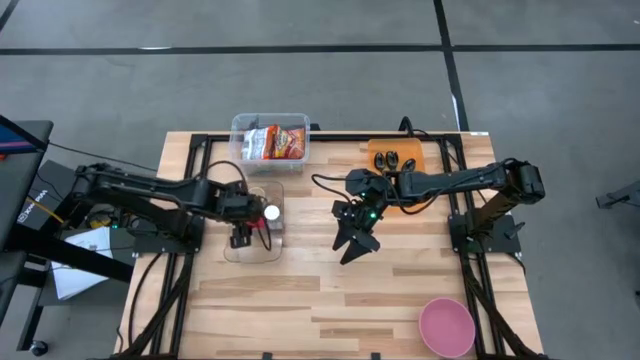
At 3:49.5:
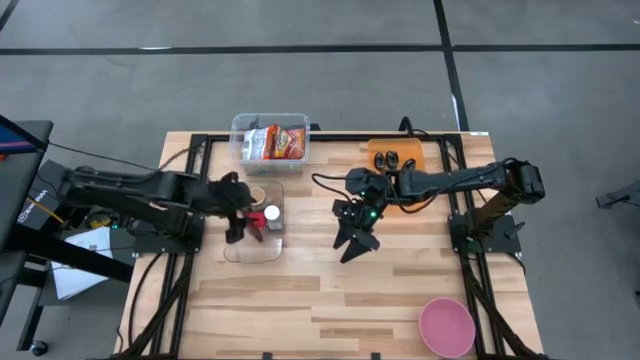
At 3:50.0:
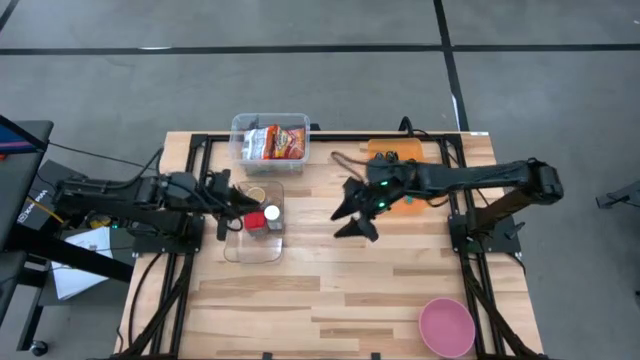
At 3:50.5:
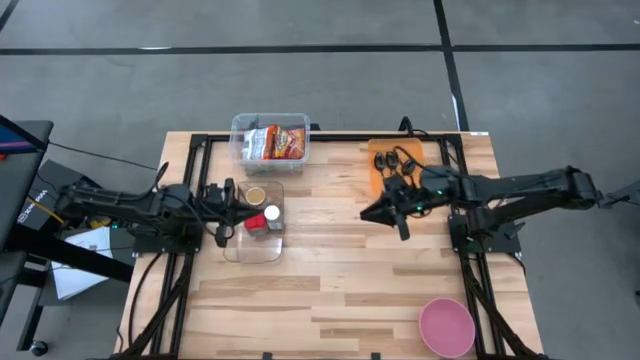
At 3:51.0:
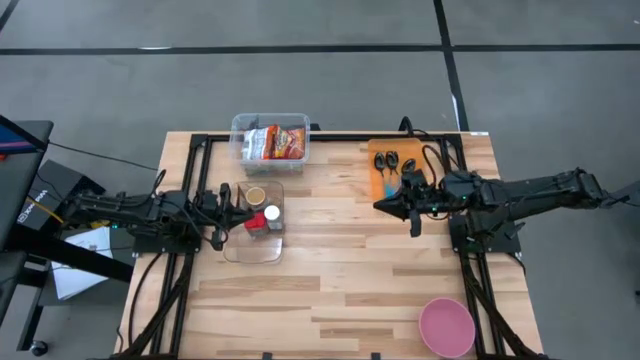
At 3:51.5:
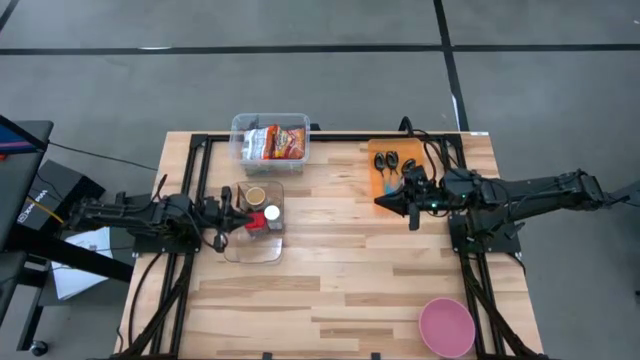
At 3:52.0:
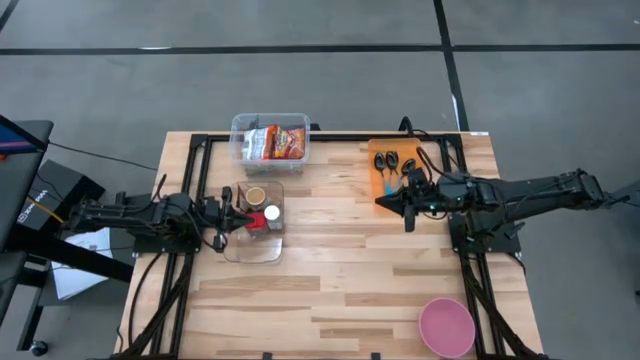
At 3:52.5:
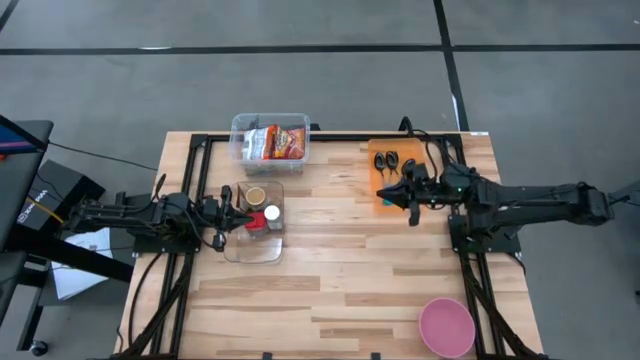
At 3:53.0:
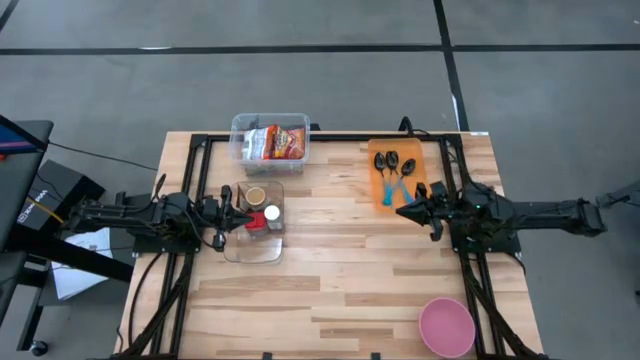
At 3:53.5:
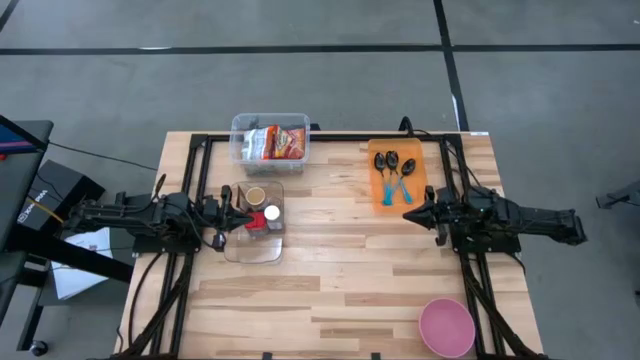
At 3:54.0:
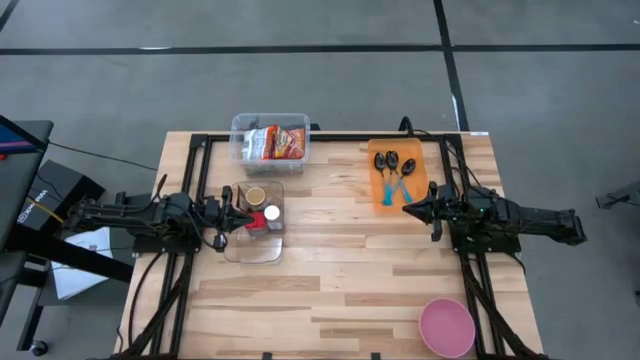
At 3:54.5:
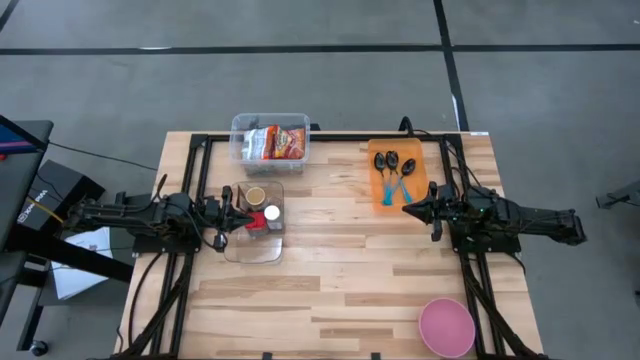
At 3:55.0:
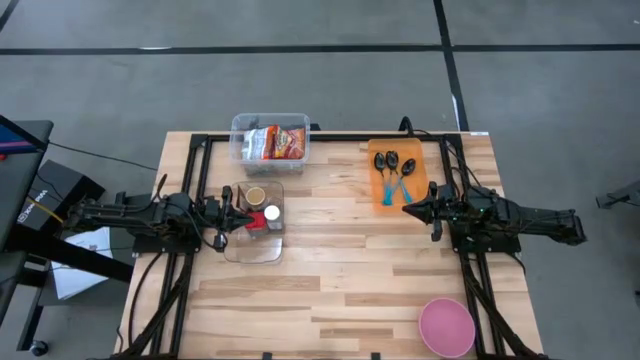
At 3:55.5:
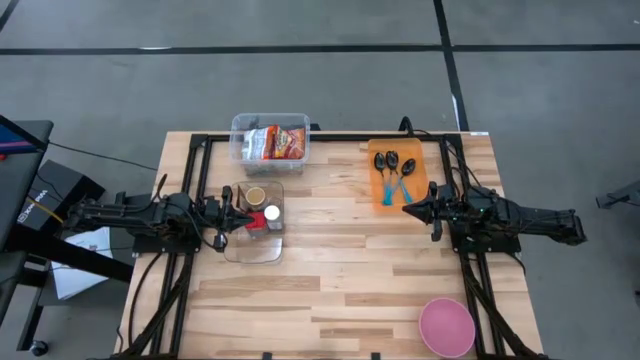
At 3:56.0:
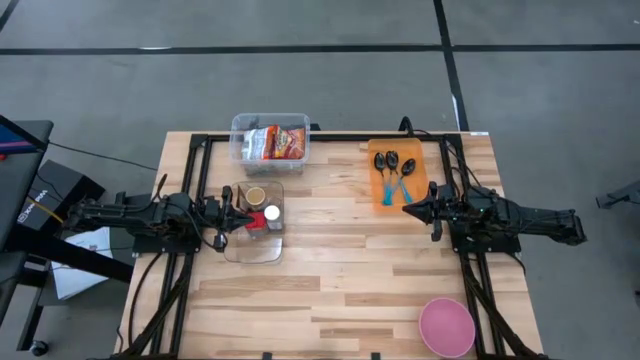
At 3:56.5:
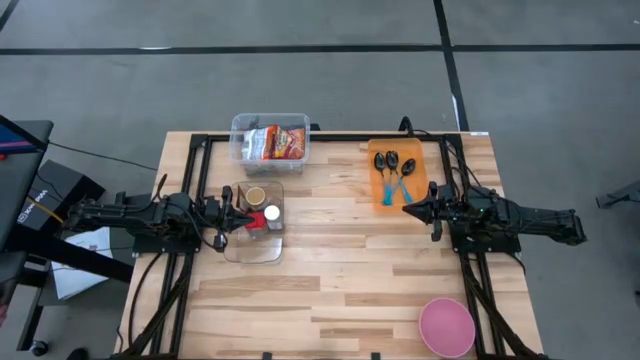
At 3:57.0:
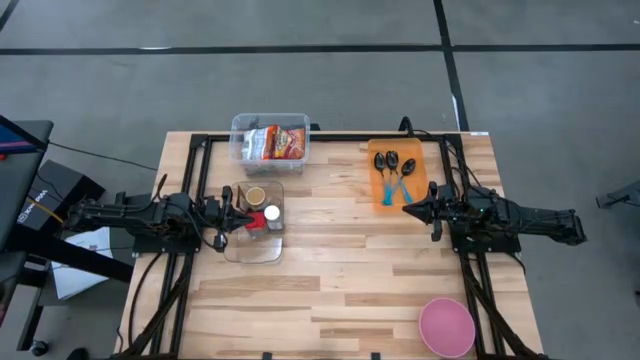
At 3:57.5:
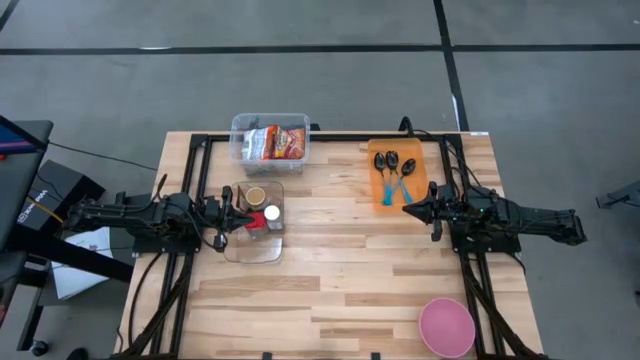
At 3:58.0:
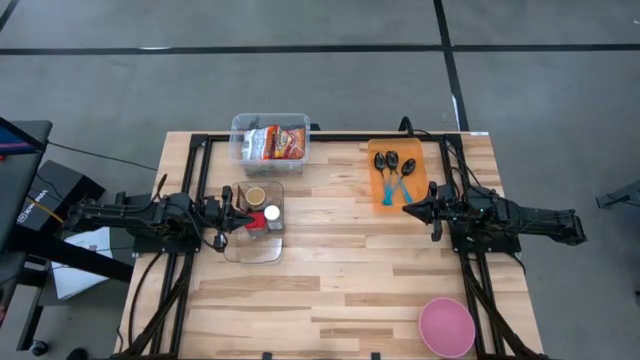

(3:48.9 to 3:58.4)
Task: Pick & Place Food Item
Return to Home Position

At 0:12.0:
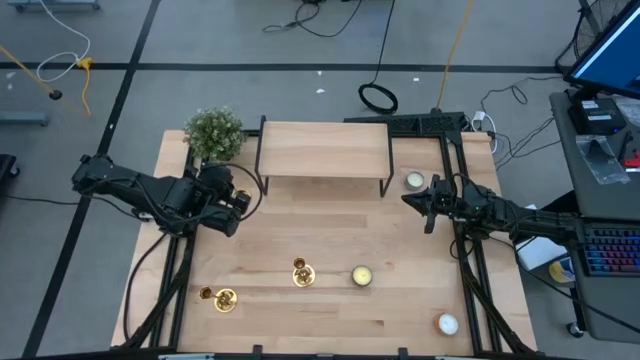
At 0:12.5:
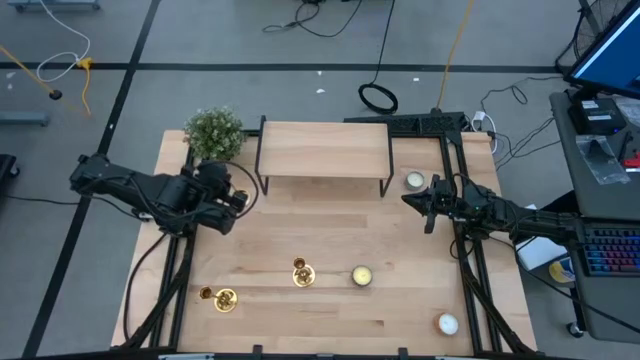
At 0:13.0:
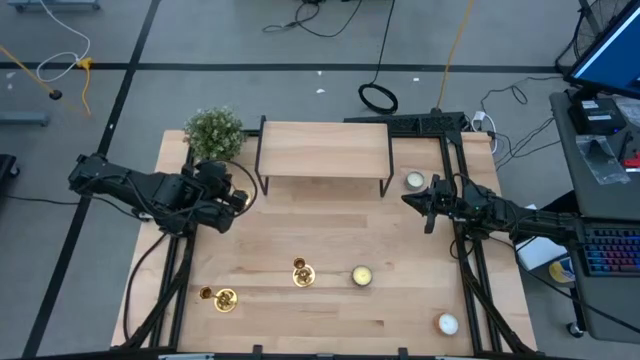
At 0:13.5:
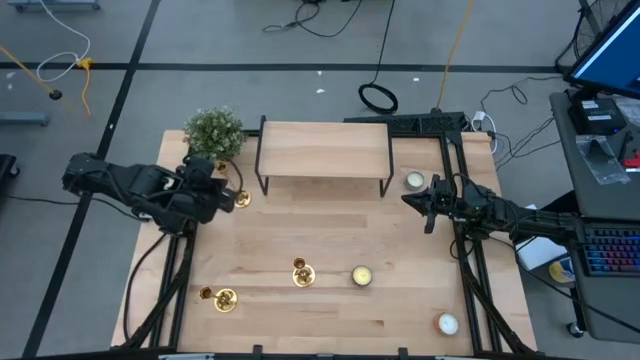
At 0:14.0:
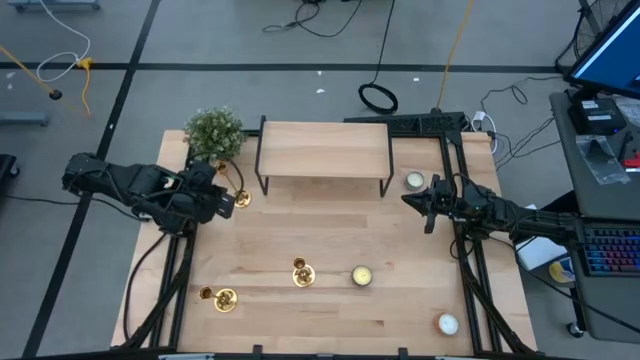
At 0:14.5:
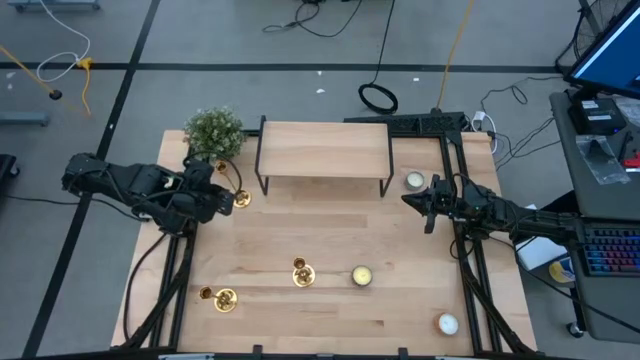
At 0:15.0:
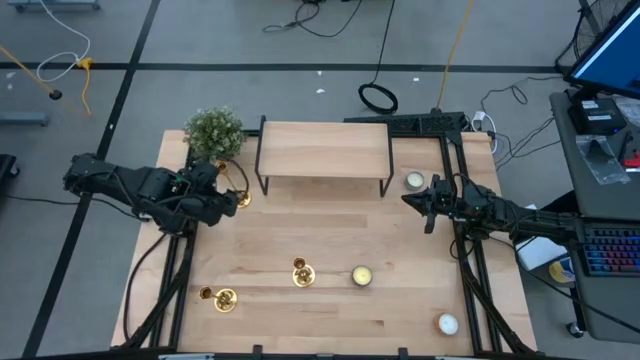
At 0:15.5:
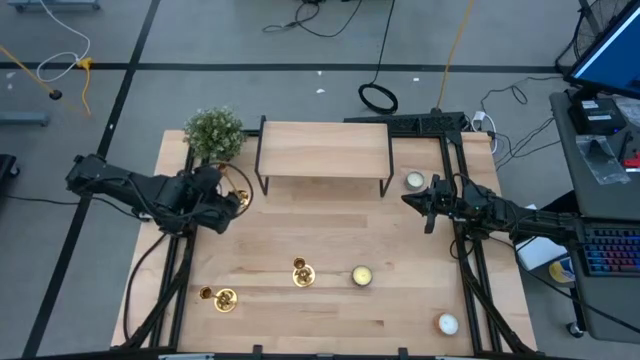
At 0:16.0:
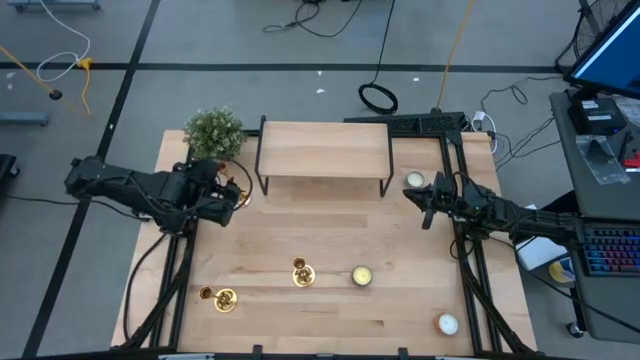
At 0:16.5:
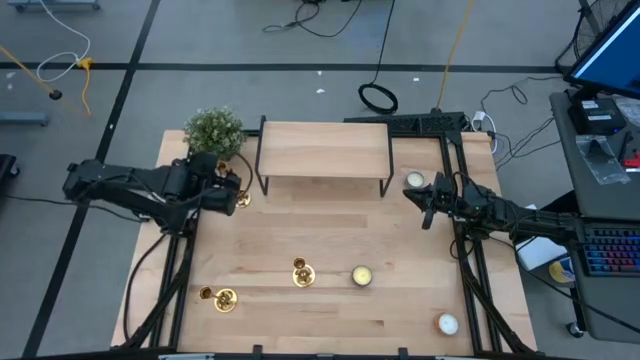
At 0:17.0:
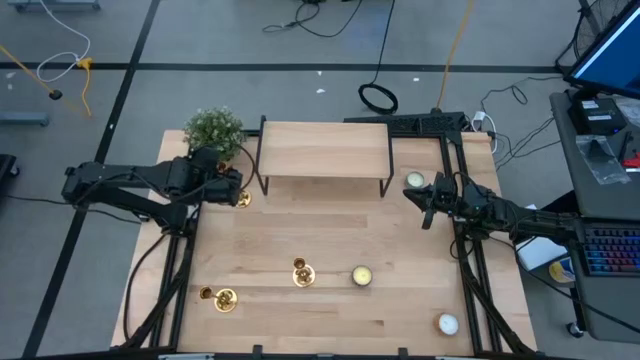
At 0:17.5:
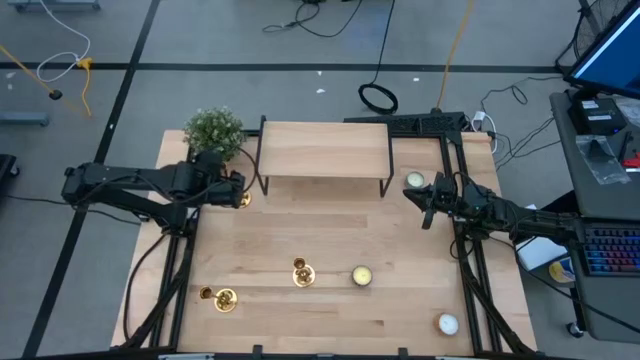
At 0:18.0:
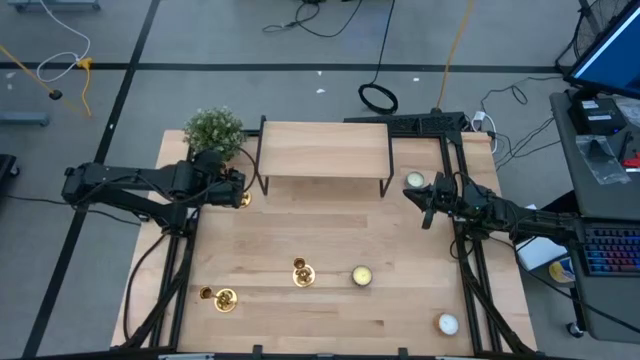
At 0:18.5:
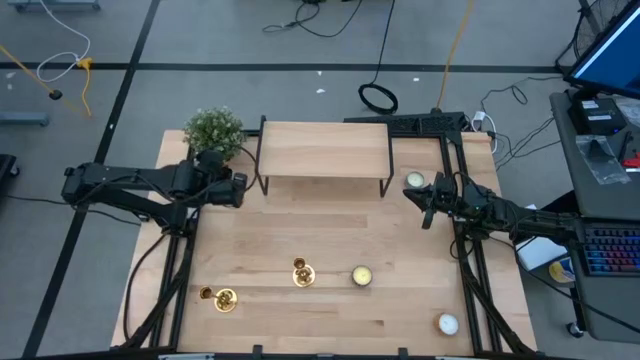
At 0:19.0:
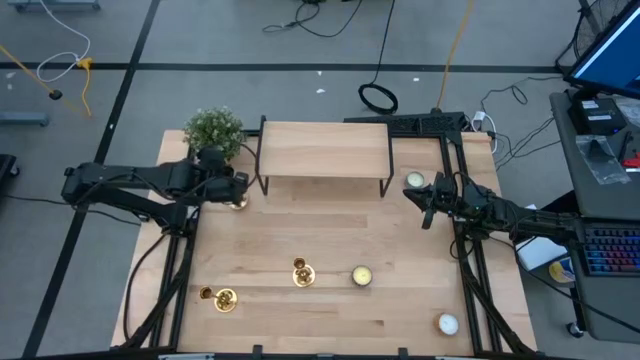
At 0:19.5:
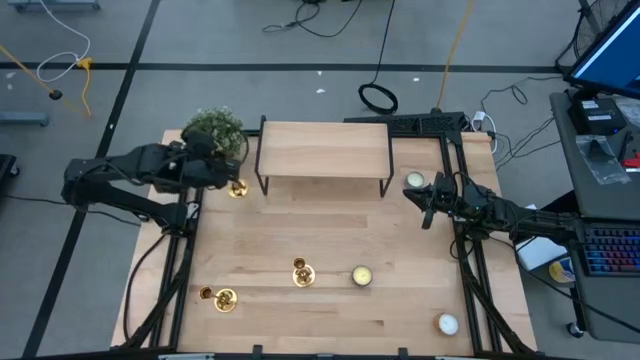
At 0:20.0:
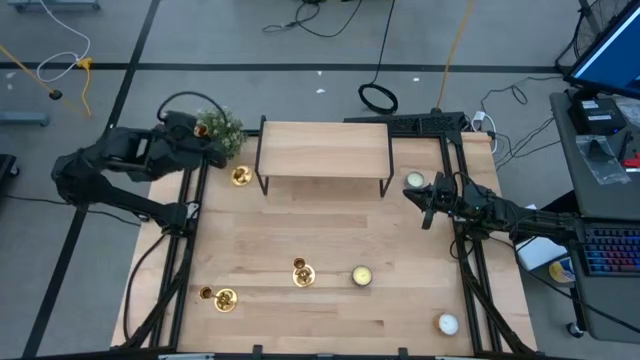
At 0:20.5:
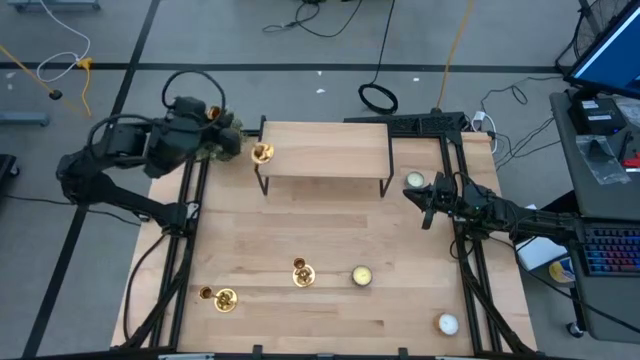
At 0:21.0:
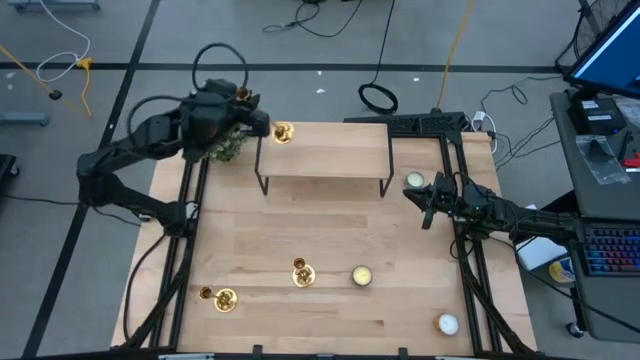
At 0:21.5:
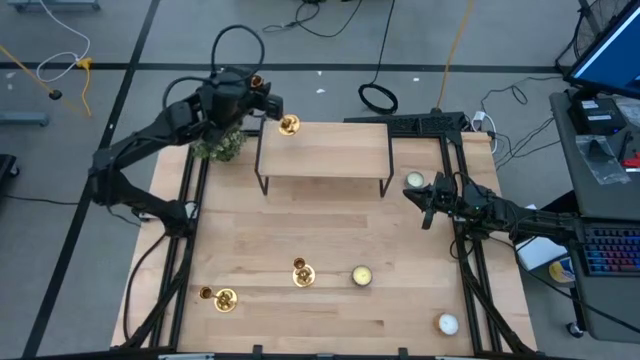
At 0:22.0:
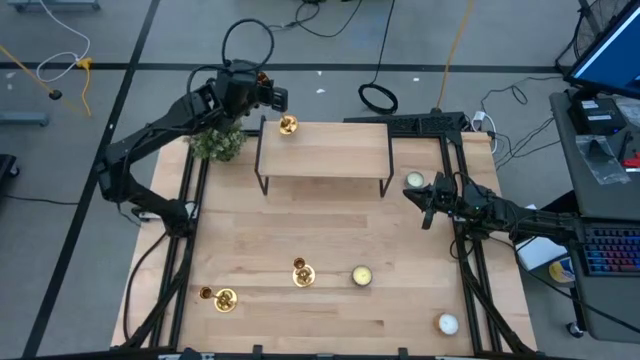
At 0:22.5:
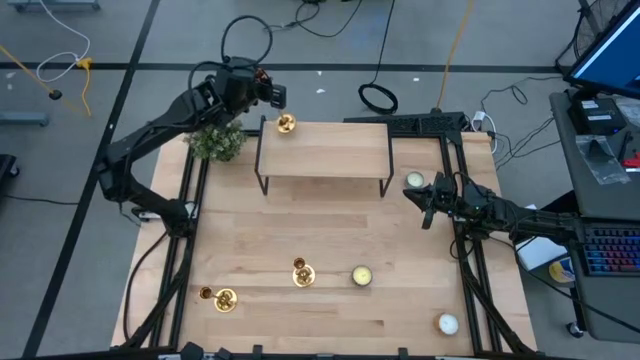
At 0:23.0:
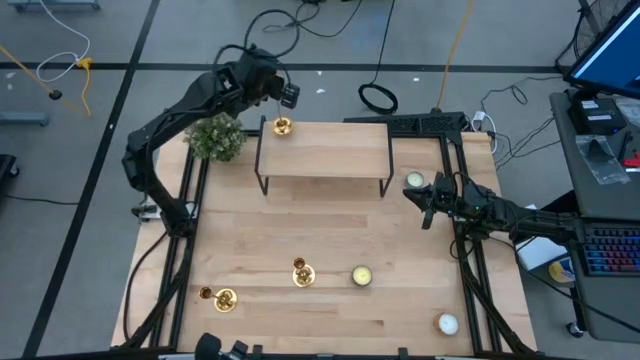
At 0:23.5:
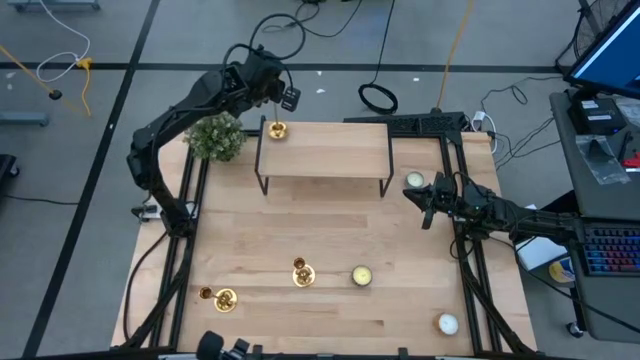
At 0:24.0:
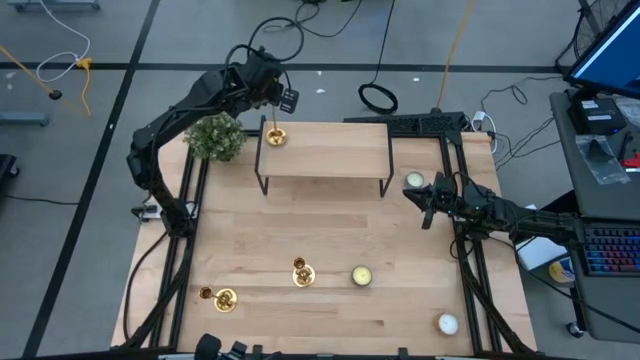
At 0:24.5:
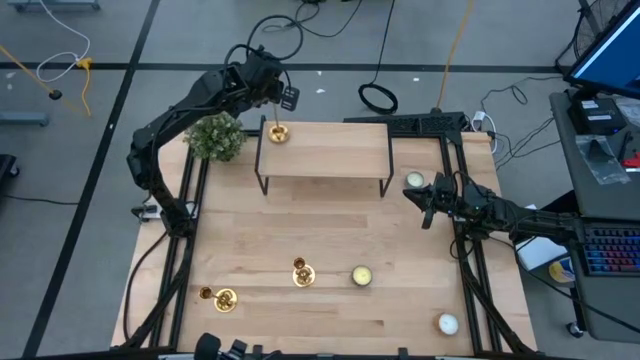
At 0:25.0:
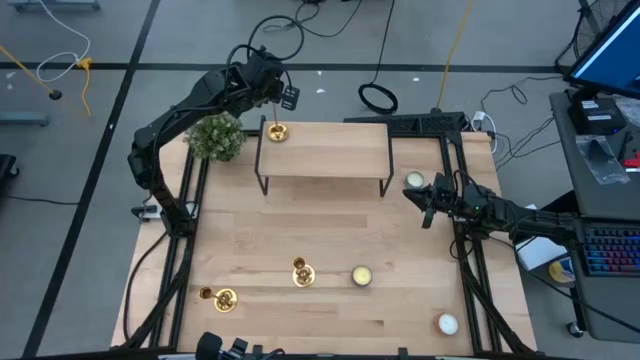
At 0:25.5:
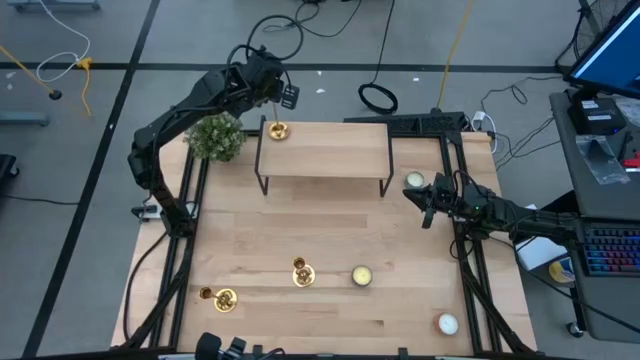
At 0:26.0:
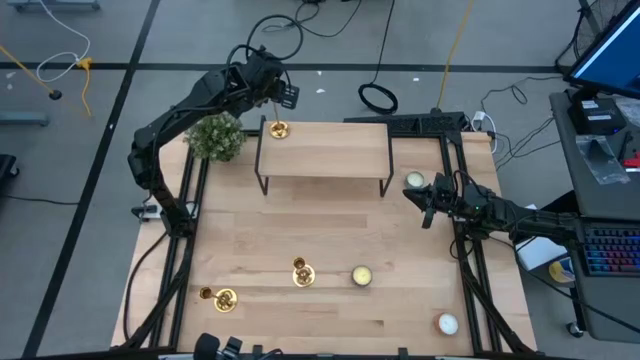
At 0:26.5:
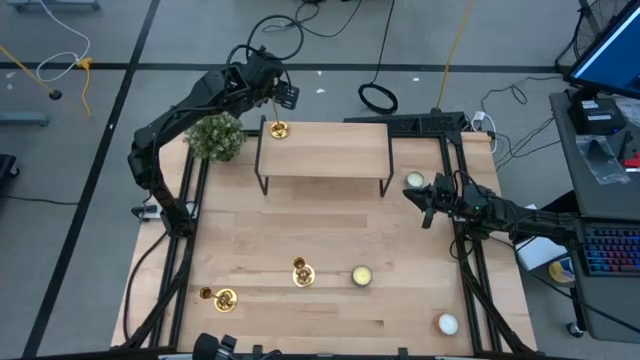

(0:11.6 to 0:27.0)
Task: Pick & Place candle stick holders
Put the top gold candle holder on the shelf
